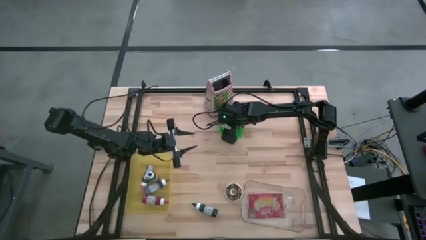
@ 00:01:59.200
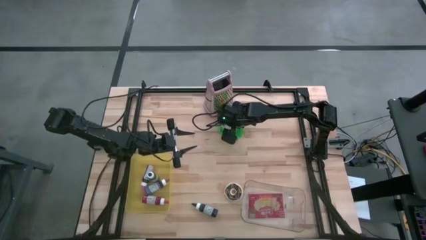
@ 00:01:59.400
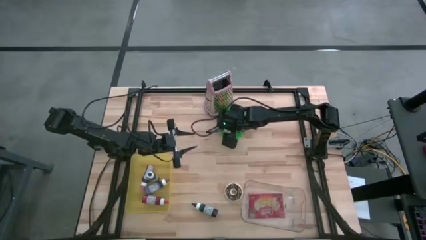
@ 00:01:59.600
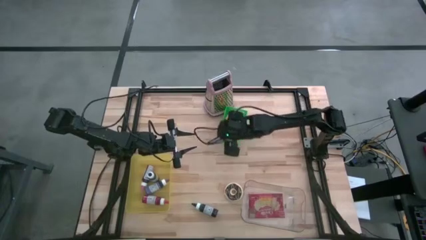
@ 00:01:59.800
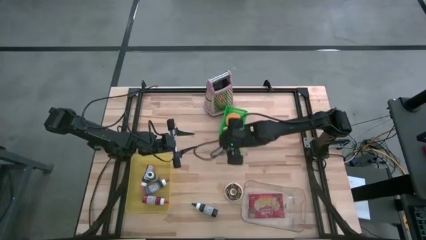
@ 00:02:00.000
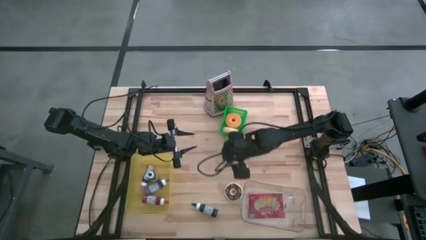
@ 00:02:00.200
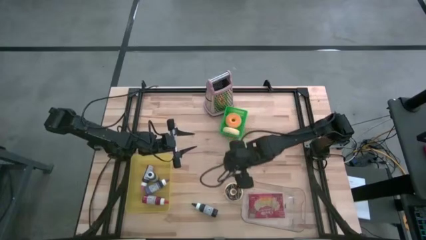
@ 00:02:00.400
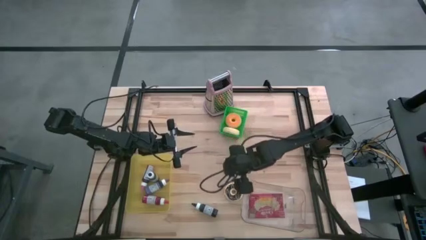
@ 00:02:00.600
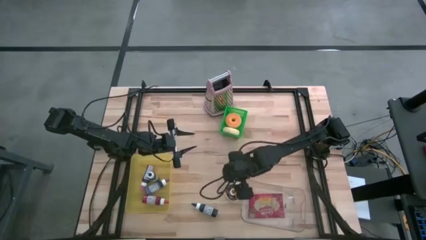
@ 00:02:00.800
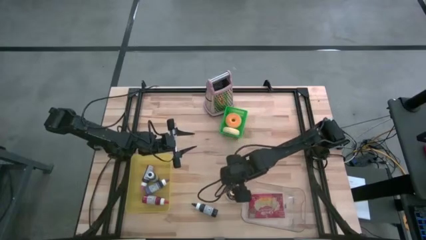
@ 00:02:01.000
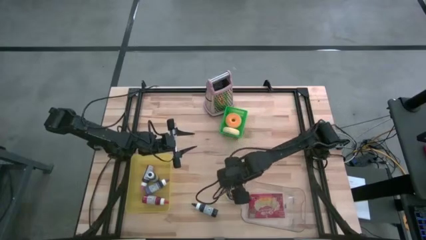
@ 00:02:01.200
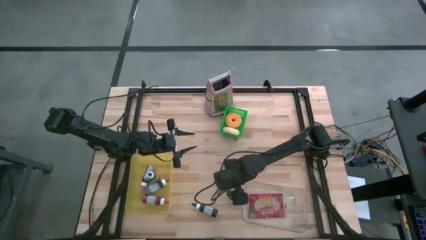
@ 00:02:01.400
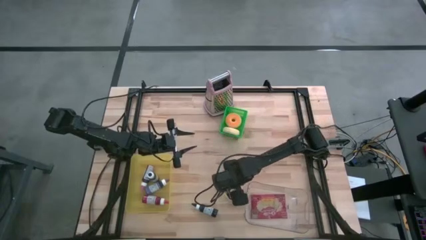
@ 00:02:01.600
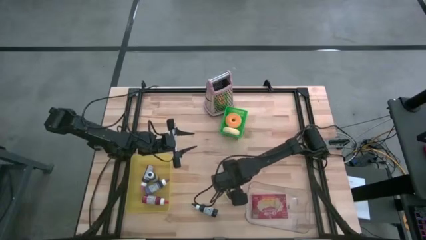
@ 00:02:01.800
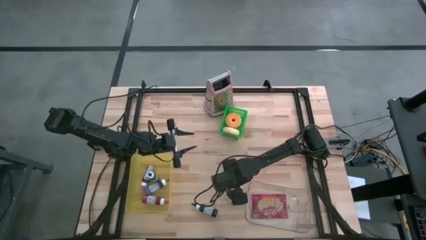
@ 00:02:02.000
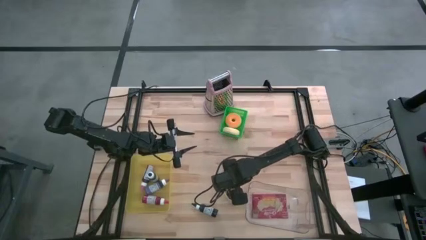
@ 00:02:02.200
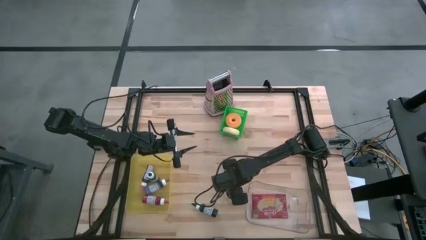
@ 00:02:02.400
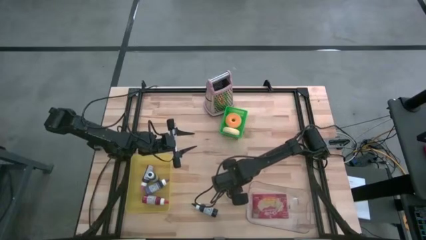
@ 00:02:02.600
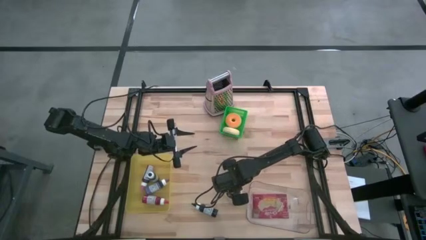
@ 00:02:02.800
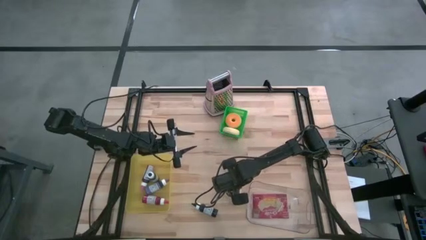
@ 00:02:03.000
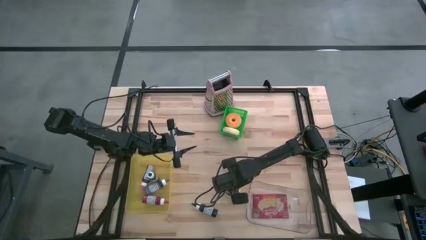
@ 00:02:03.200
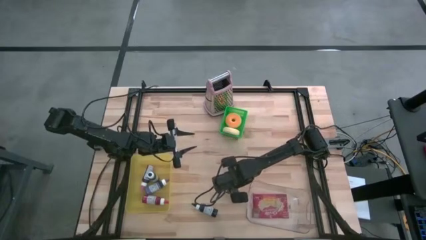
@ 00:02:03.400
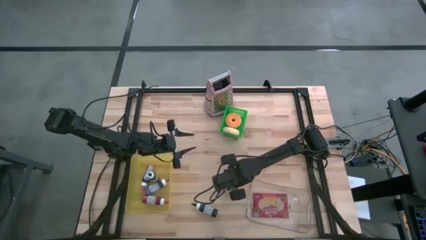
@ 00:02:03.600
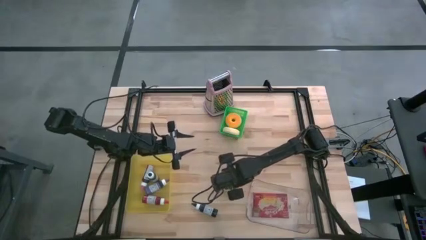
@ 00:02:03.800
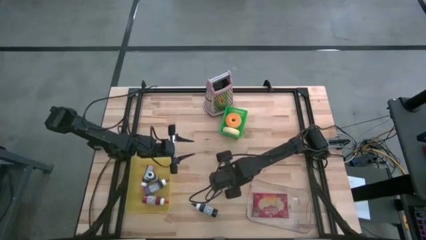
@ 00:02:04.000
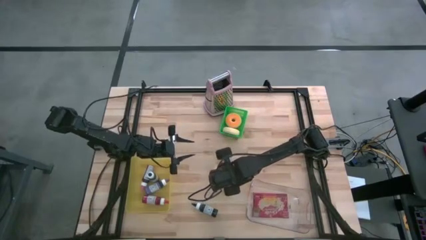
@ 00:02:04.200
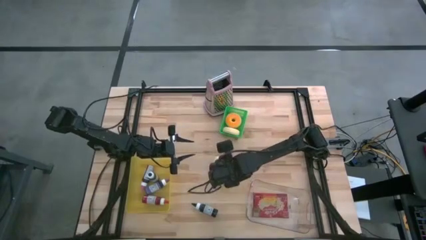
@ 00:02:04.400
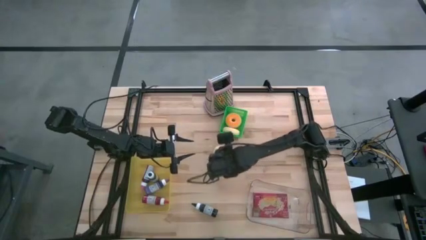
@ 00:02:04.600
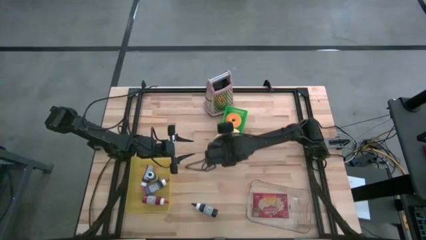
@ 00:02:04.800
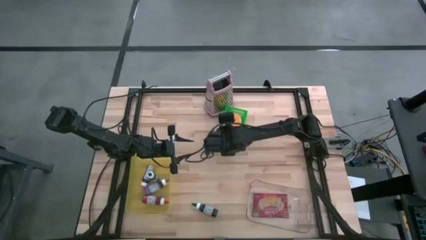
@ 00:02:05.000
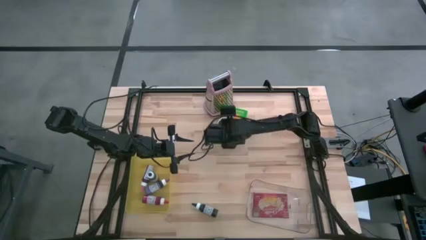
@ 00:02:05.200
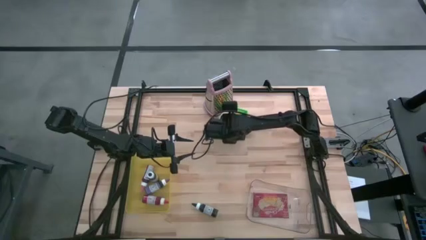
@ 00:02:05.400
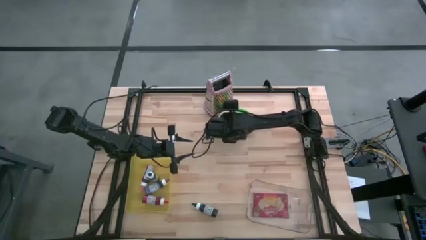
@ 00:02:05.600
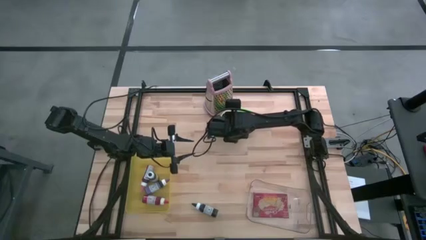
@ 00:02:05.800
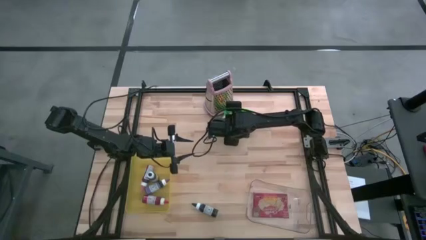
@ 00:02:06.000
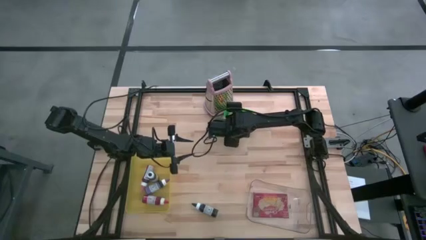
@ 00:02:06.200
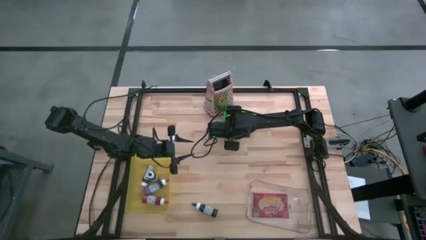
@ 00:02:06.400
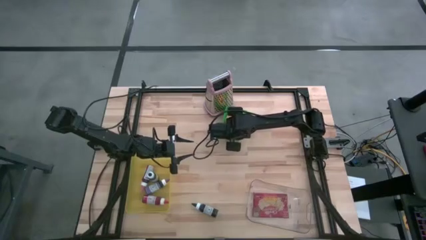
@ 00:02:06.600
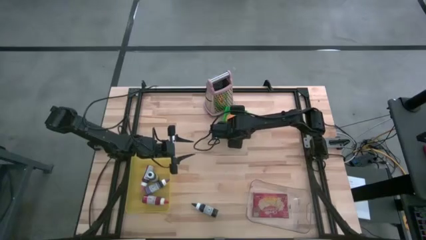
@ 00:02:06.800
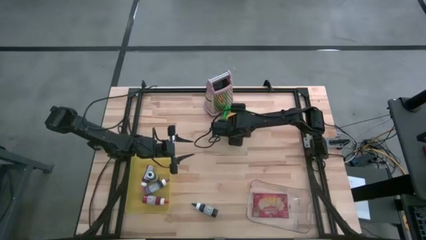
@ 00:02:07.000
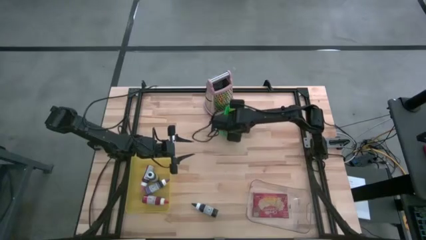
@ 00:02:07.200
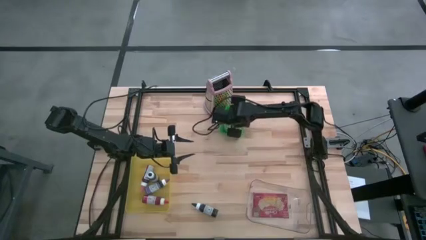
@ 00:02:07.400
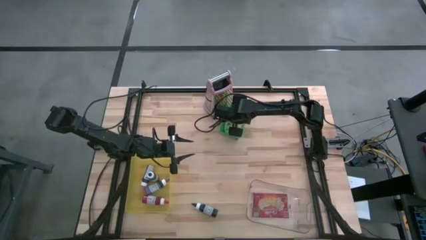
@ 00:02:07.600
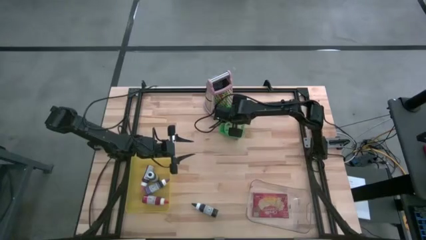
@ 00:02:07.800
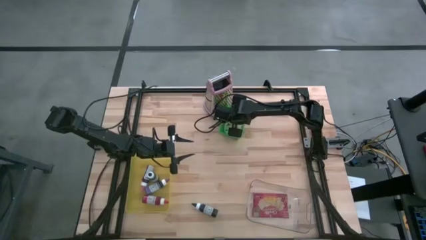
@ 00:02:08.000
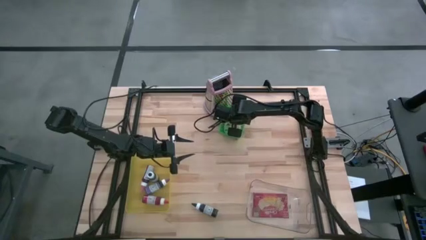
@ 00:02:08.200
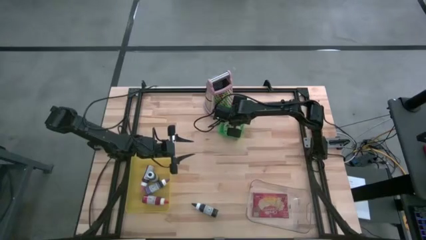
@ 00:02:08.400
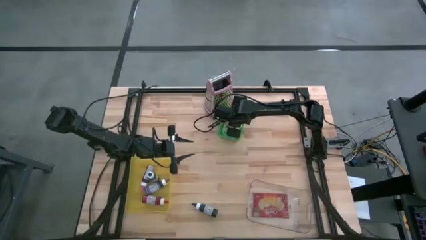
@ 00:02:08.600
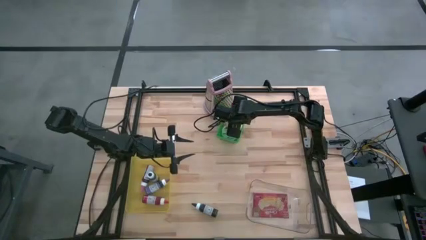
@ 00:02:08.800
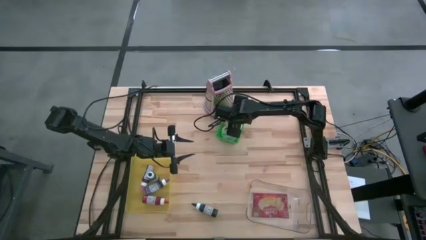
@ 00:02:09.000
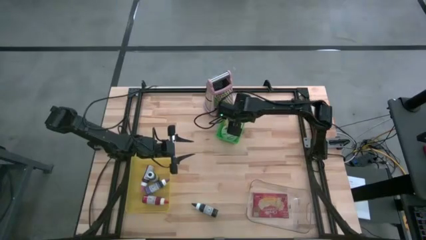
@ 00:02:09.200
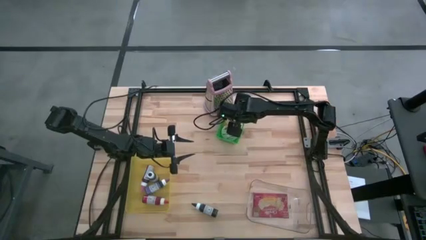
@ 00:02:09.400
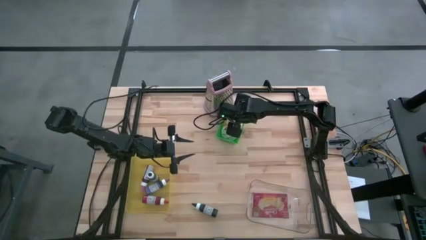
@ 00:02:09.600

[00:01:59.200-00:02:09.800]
Task: Pick & Place Food Item
Put the black donut into the green bin

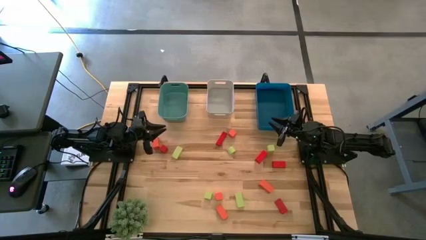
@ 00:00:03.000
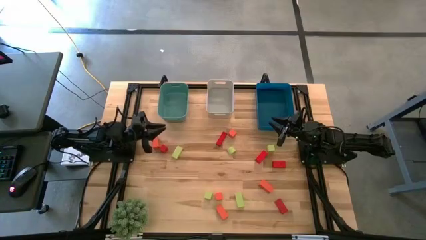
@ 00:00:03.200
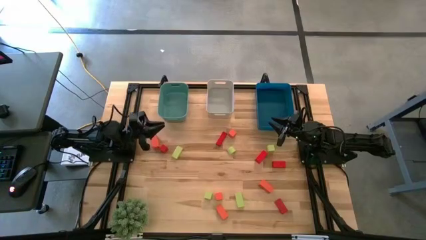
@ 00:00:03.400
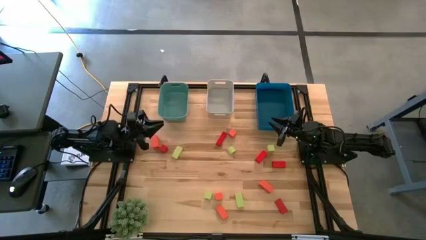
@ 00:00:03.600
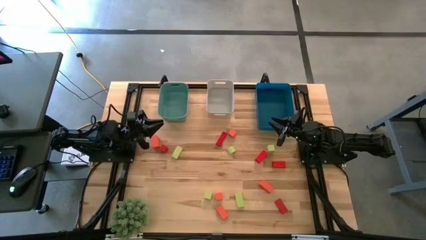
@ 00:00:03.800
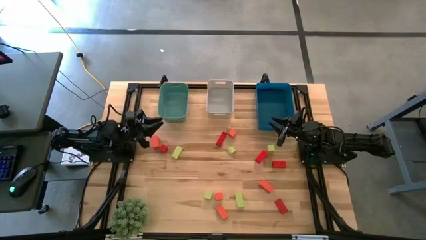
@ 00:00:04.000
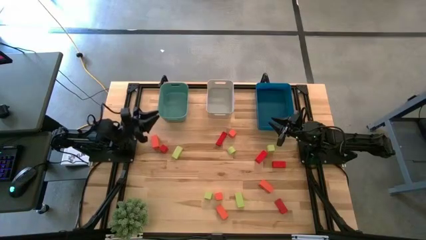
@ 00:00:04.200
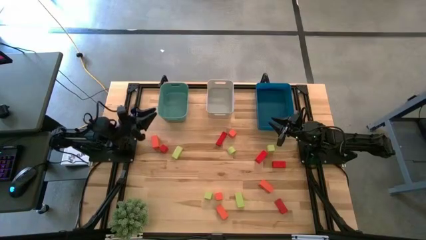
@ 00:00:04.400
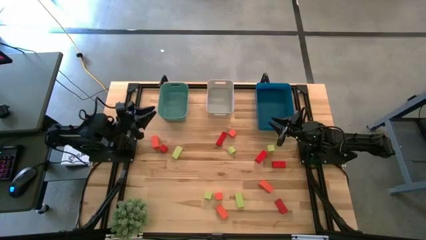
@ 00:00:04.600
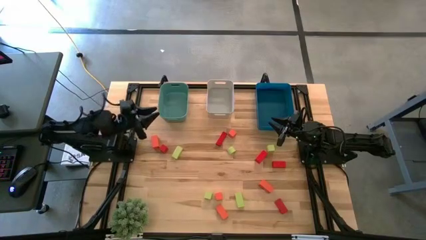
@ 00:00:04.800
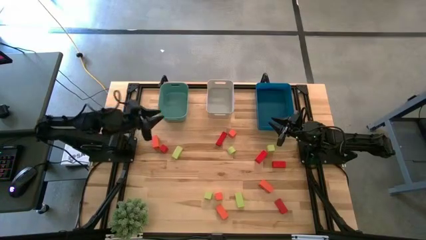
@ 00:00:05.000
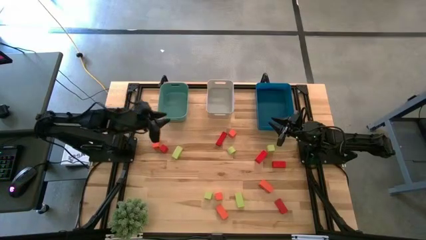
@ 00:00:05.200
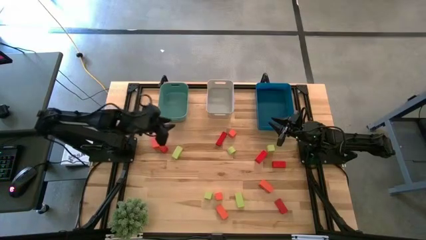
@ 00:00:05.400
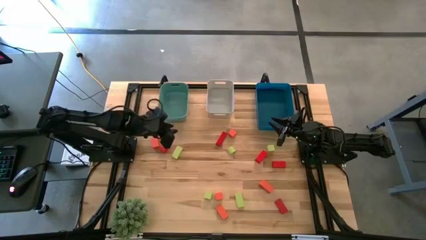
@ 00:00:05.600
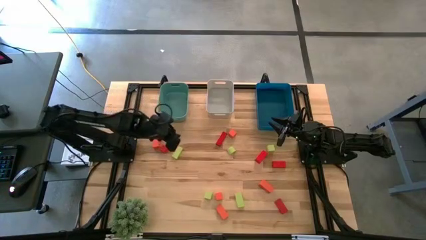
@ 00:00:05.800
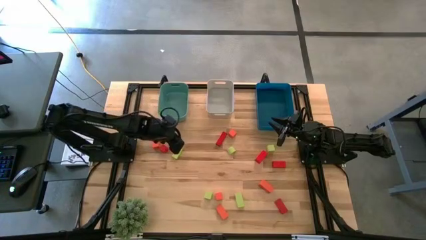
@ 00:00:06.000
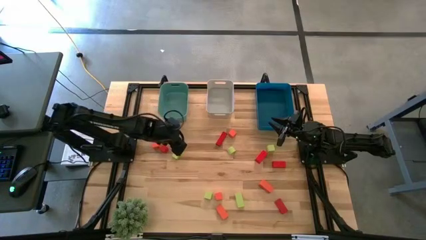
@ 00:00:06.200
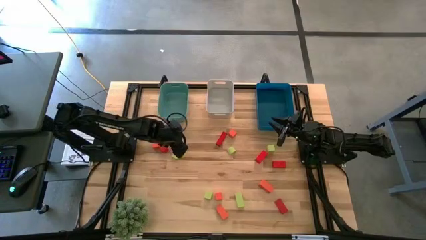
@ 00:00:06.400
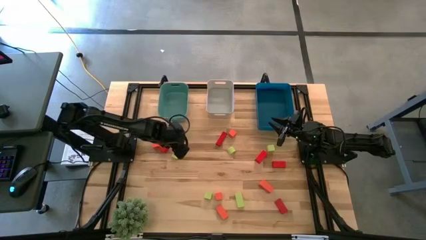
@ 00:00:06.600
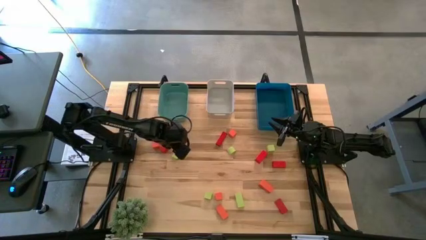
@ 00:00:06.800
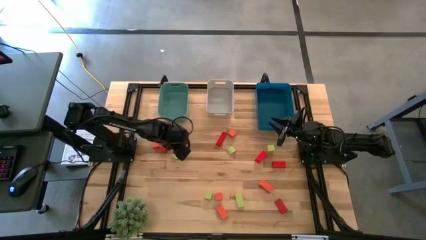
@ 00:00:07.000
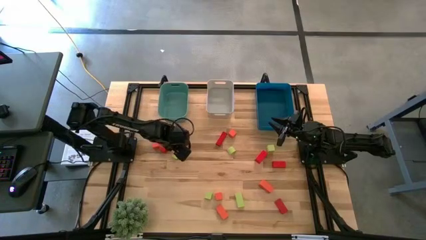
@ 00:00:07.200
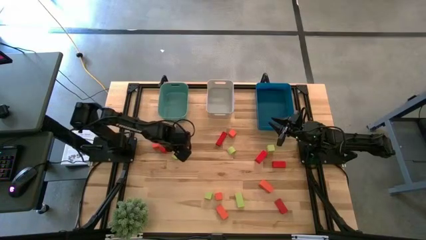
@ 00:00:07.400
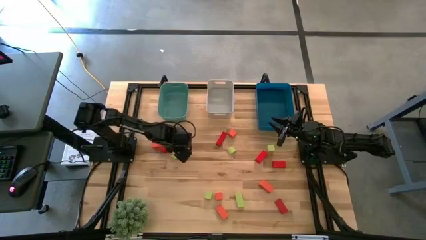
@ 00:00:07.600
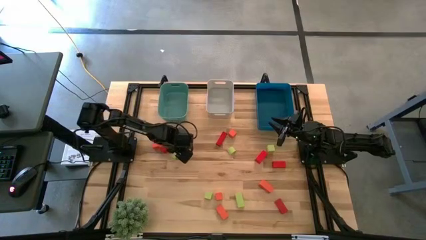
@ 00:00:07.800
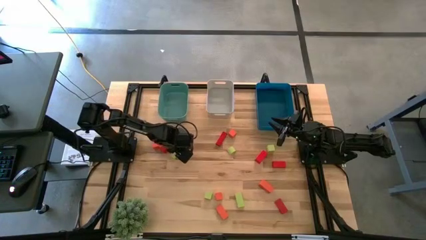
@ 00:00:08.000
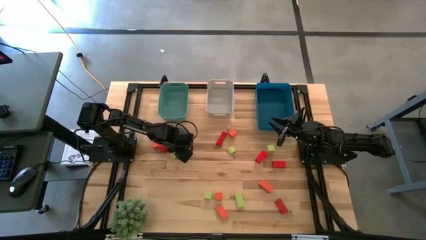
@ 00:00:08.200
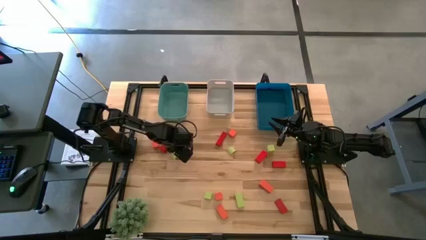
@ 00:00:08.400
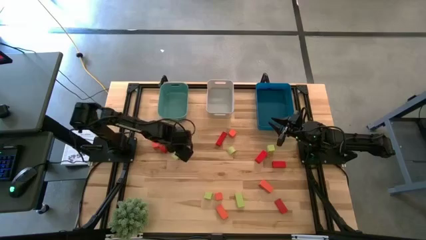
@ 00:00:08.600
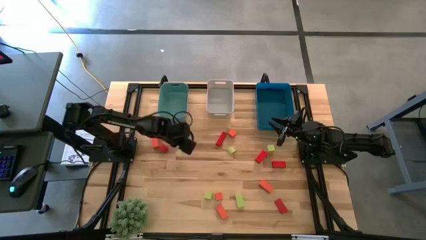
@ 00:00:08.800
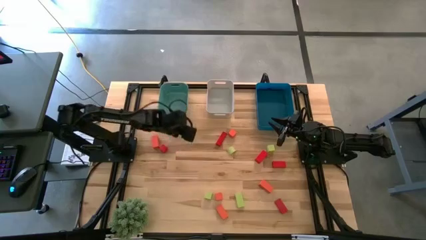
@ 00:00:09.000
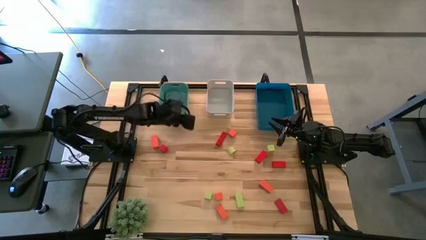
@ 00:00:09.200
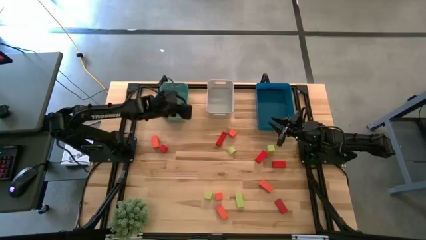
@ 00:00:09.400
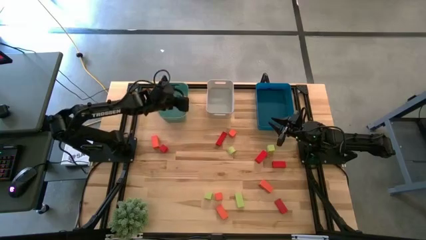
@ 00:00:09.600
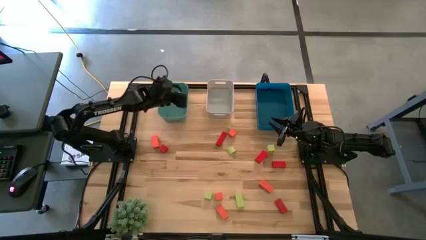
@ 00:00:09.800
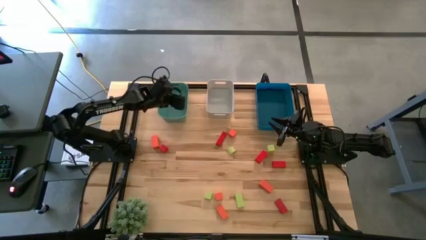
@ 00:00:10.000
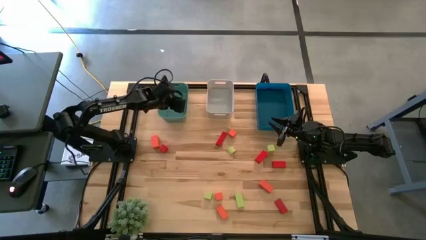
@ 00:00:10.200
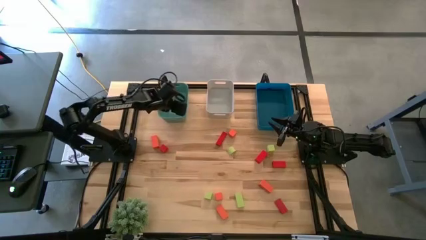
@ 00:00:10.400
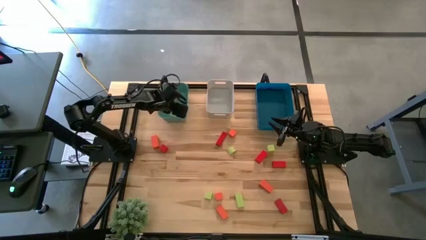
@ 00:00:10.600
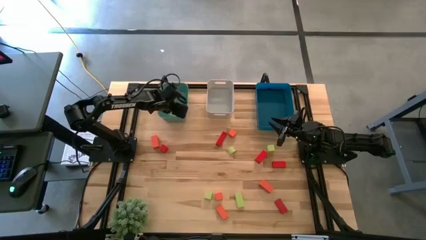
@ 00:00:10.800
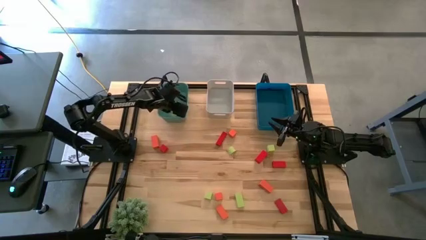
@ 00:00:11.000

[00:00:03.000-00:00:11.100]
Task: Sort & place blocks by color
Put the green block into the green bin
